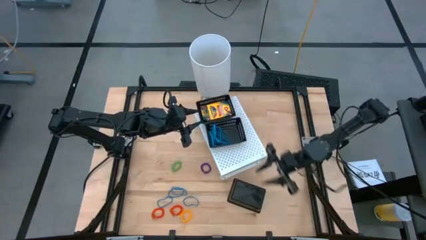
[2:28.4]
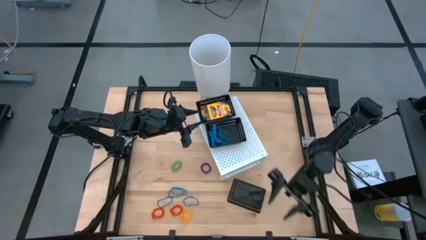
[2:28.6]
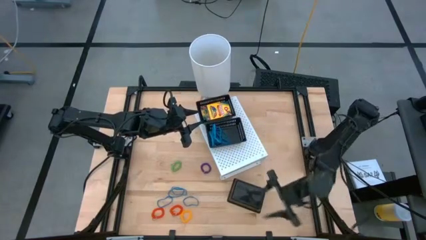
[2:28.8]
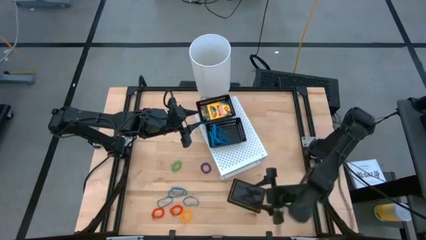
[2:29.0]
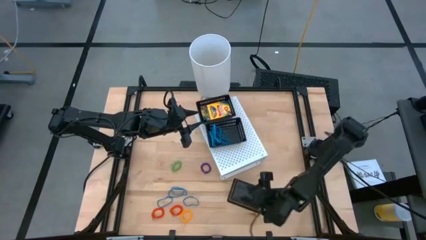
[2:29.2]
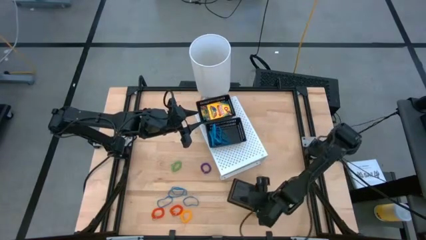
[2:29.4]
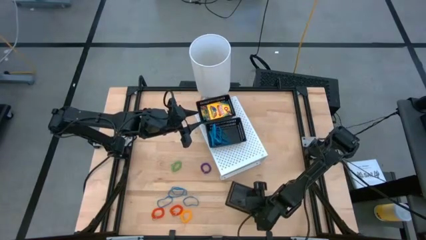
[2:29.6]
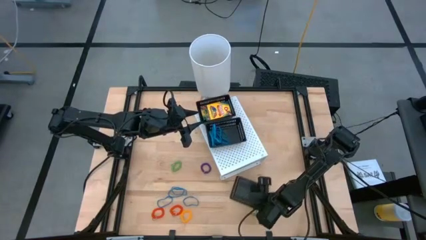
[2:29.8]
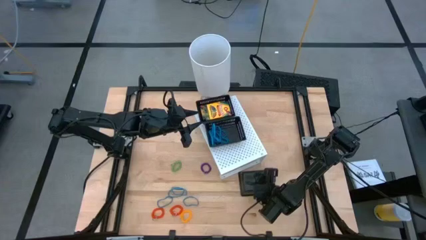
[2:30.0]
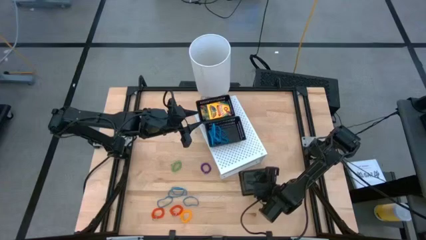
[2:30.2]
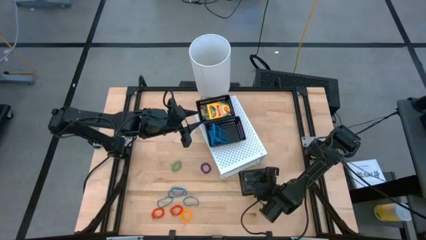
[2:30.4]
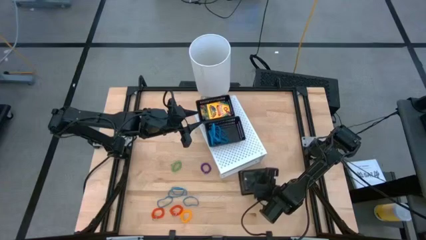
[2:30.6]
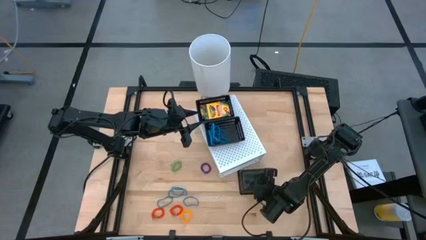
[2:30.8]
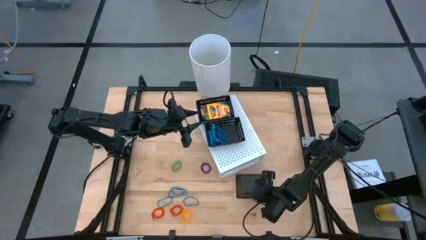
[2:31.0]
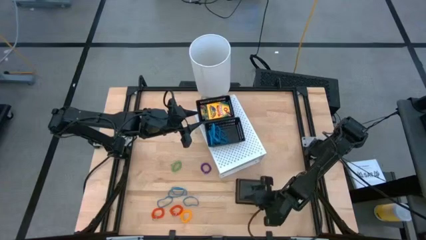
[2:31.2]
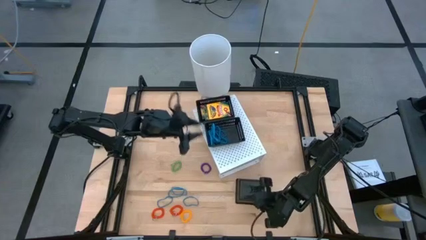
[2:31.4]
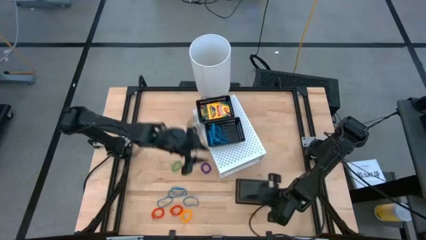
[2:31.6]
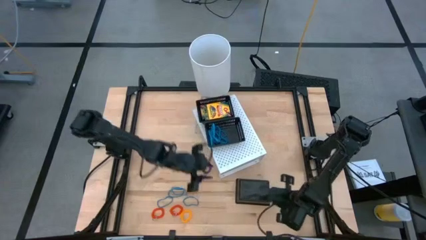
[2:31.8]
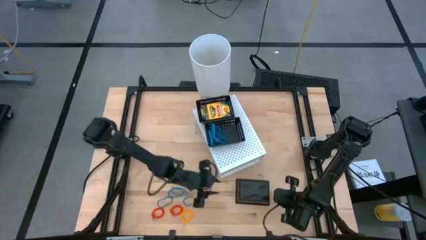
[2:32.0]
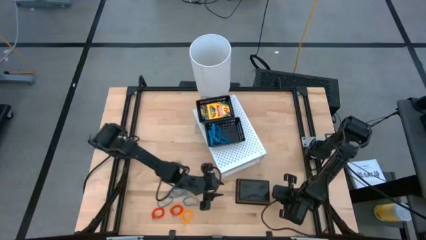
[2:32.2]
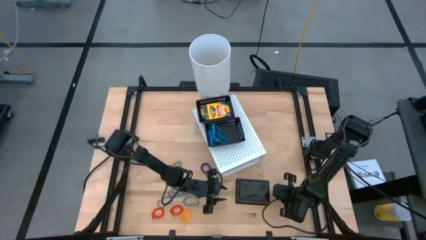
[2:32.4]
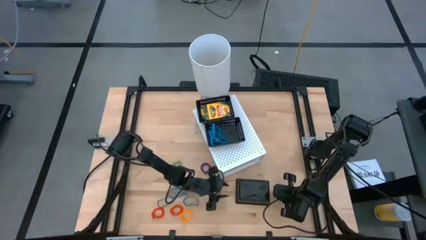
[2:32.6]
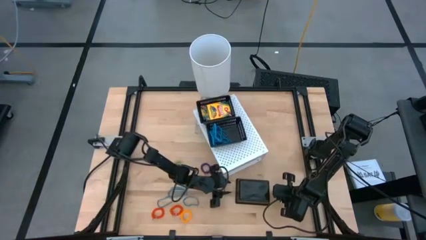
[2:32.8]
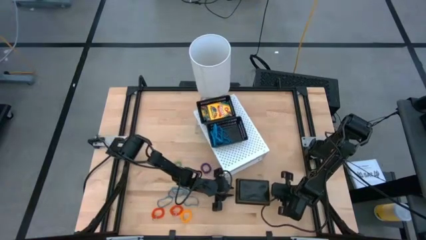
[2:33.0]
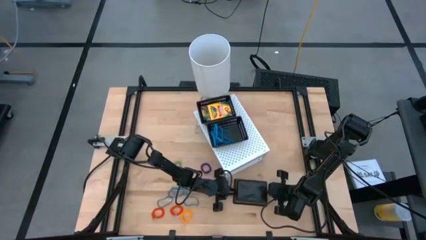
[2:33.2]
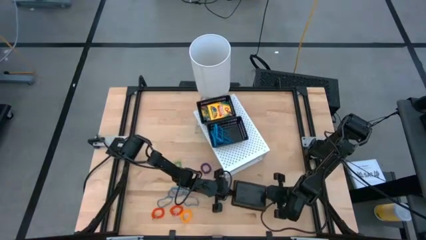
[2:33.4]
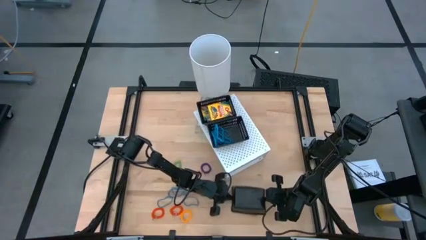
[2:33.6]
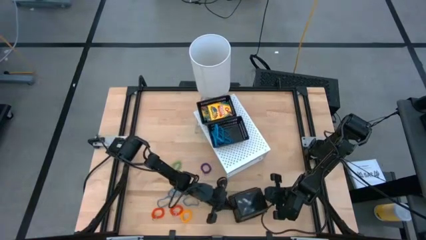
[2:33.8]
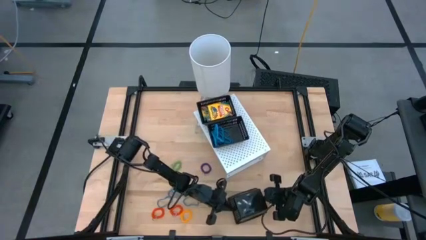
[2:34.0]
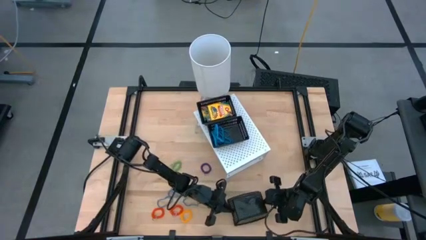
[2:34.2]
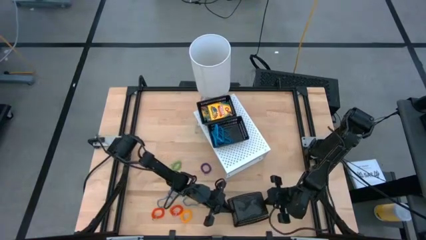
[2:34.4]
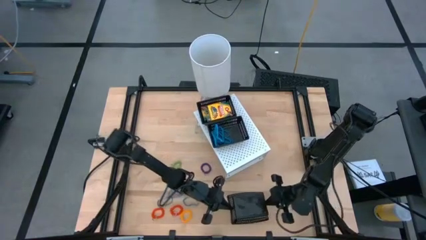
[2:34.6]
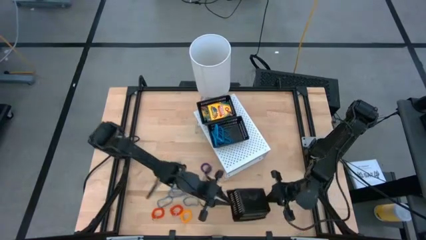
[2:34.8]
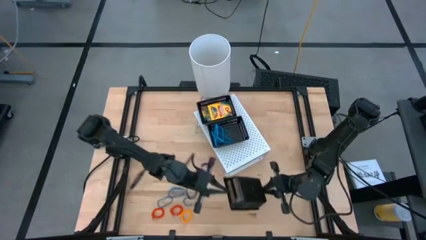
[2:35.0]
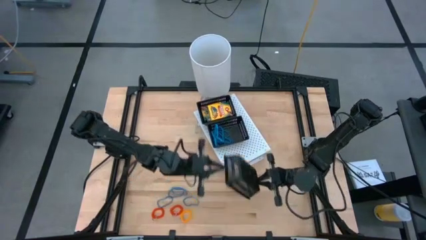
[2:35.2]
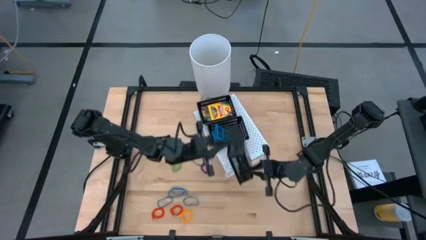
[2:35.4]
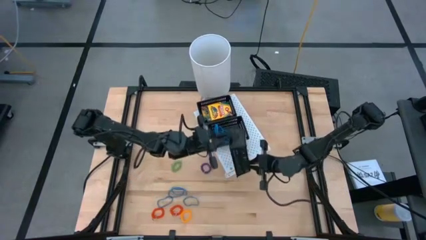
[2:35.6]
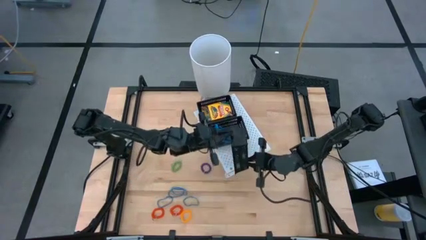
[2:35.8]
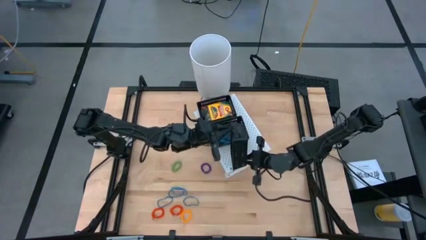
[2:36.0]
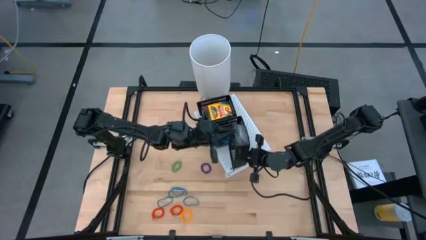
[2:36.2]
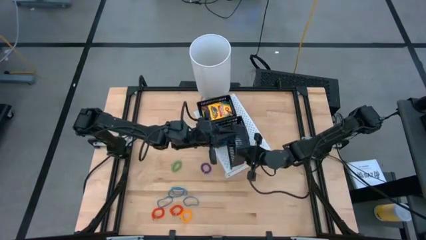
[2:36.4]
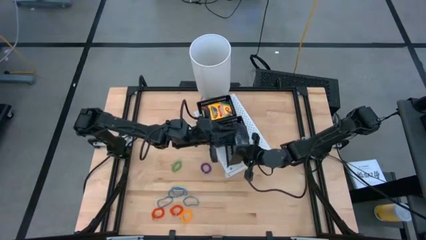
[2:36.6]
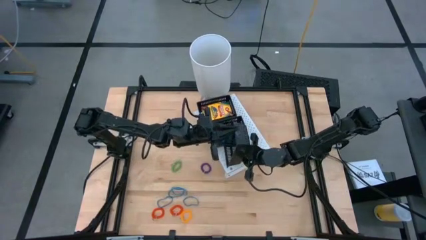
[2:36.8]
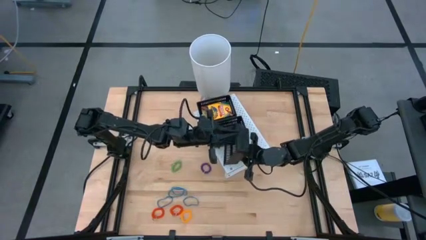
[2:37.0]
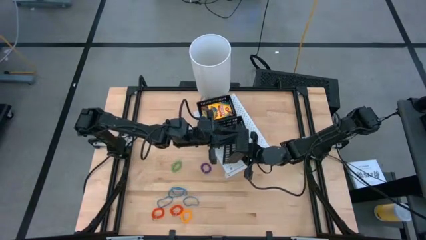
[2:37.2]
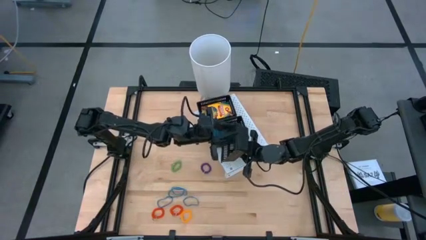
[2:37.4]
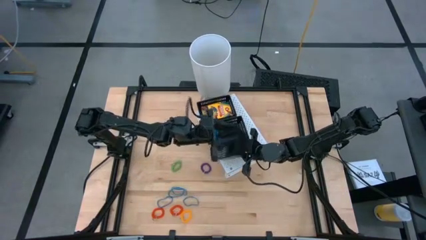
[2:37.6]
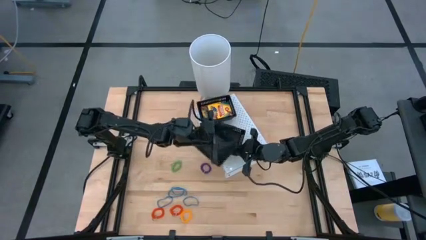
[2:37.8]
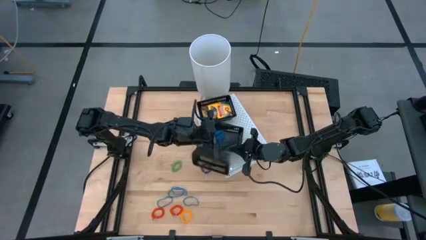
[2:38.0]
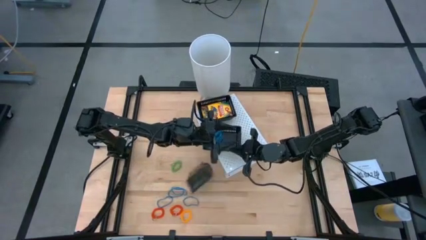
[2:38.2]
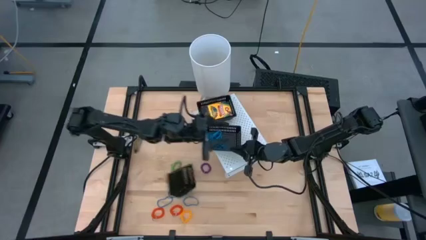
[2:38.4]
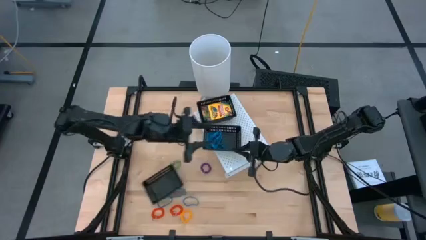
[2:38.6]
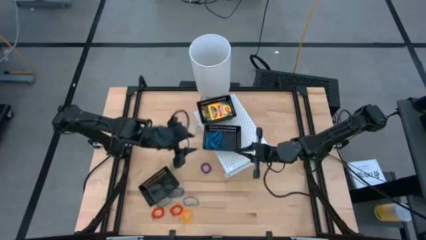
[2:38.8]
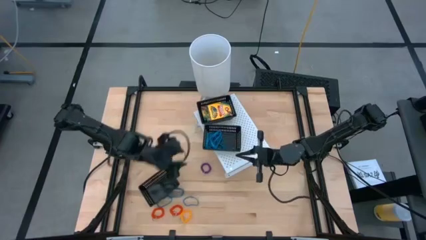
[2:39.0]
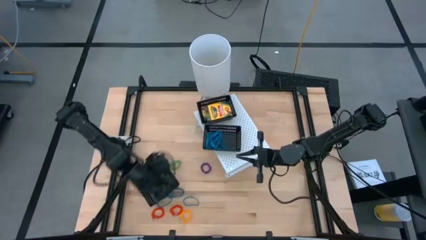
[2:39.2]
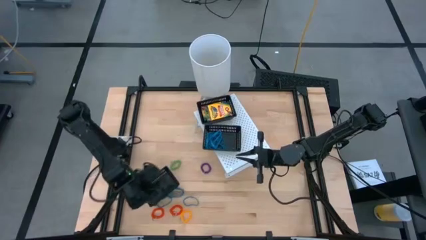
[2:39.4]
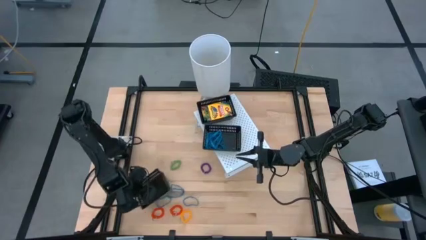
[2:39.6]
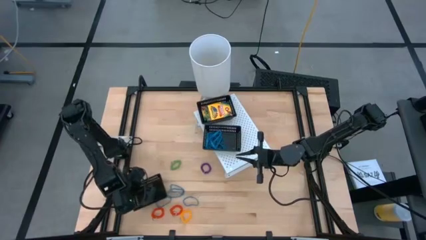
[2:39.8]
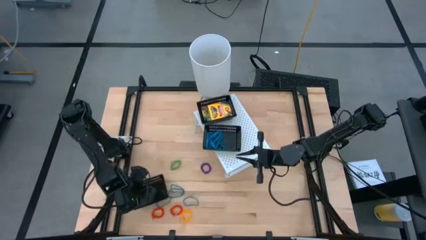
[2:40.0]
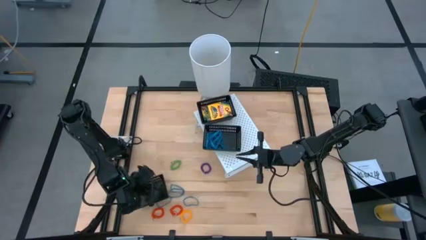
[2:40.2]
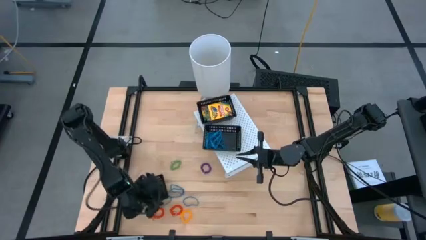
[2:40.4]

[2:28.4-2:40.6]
Task: Pick & Place Office Desk Supplies
Put the black bin on the shelf

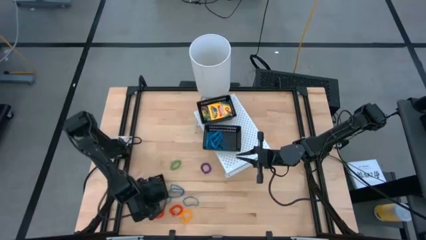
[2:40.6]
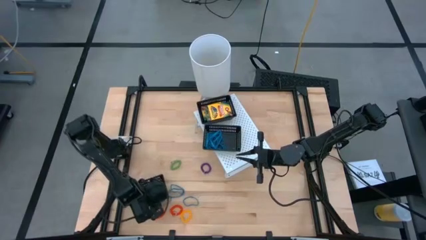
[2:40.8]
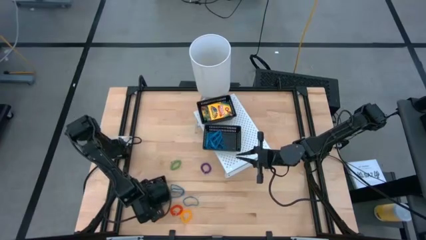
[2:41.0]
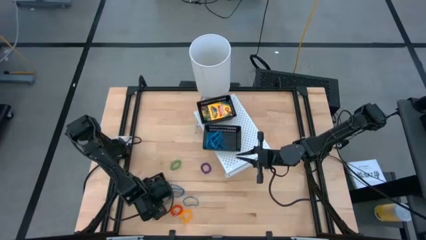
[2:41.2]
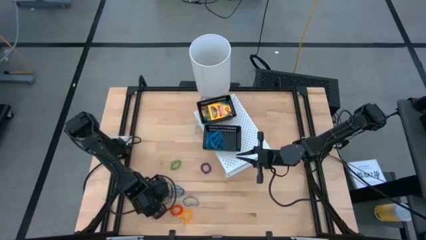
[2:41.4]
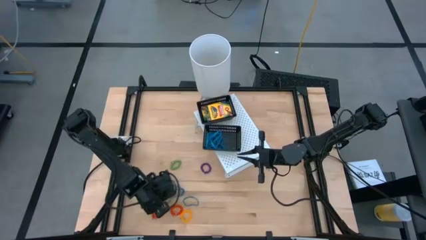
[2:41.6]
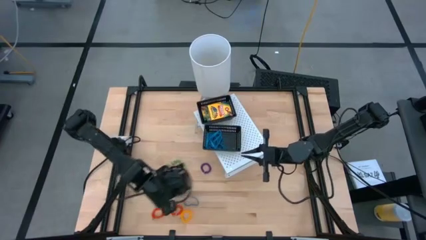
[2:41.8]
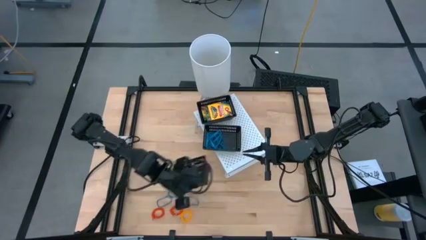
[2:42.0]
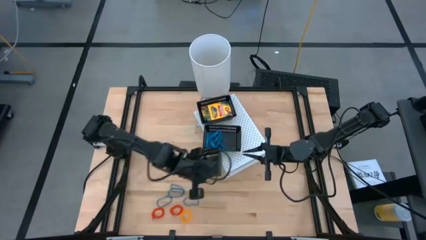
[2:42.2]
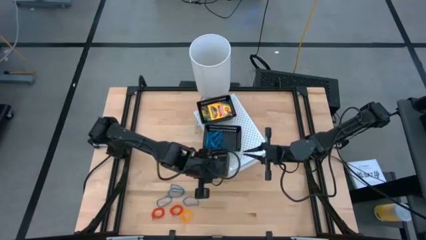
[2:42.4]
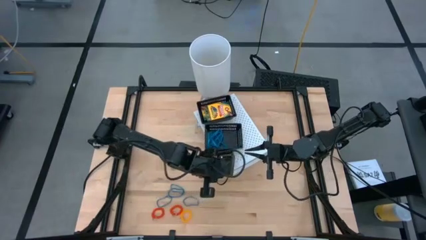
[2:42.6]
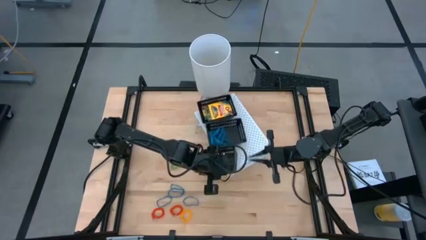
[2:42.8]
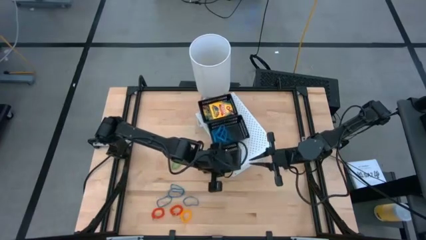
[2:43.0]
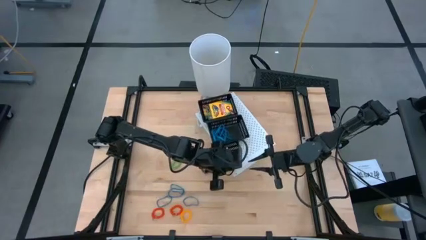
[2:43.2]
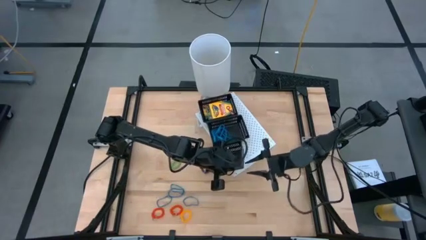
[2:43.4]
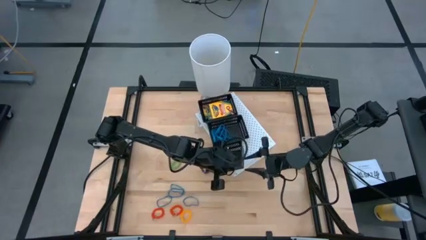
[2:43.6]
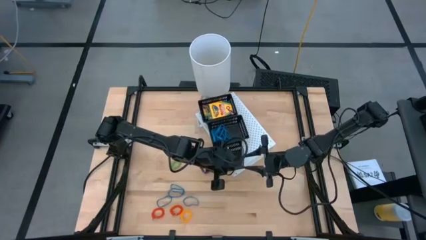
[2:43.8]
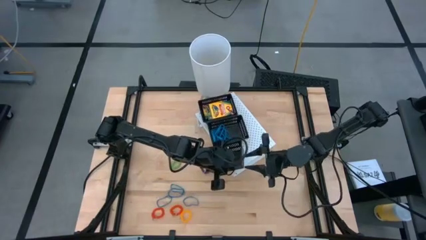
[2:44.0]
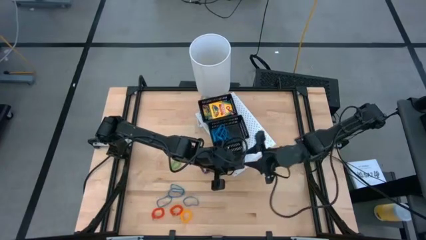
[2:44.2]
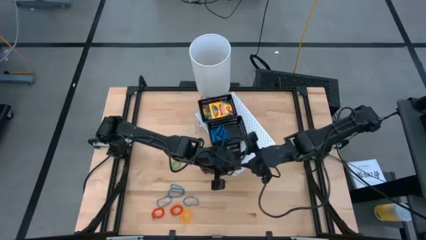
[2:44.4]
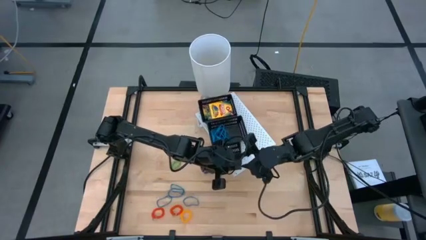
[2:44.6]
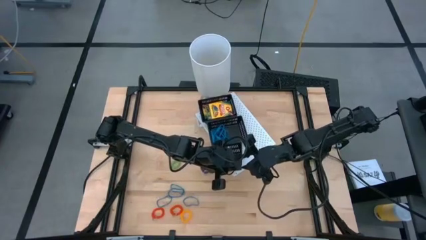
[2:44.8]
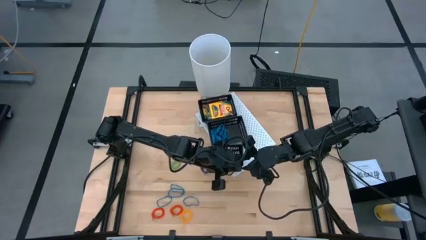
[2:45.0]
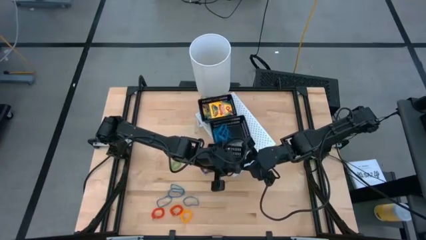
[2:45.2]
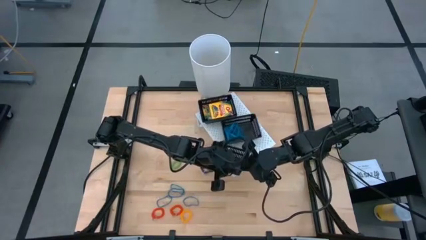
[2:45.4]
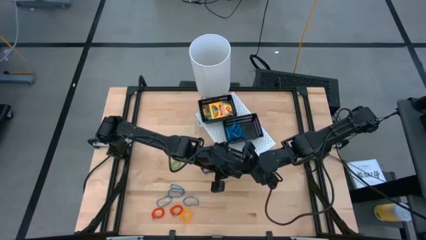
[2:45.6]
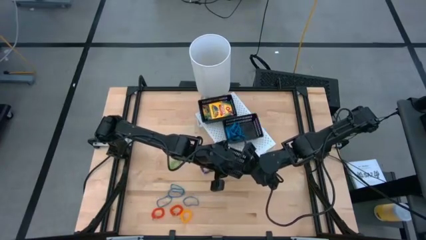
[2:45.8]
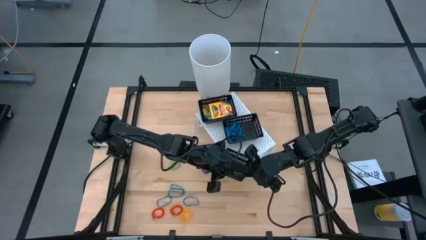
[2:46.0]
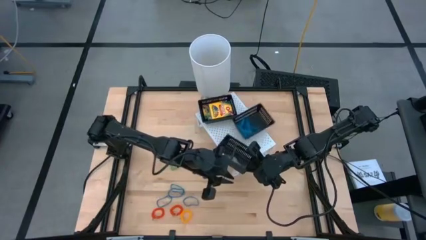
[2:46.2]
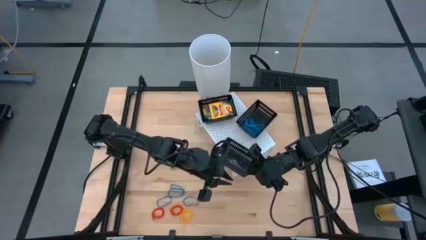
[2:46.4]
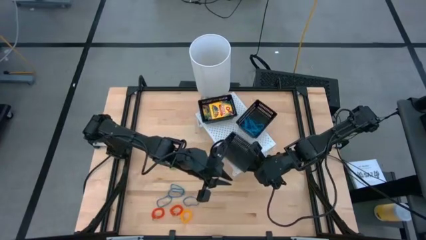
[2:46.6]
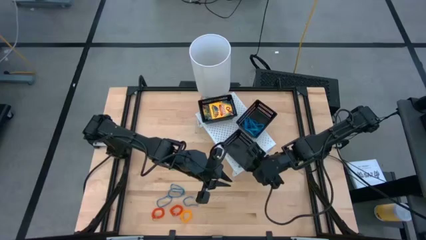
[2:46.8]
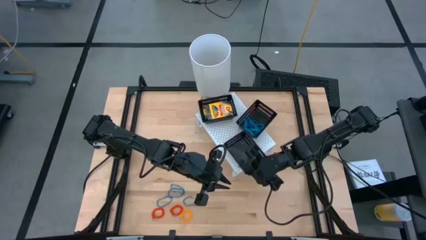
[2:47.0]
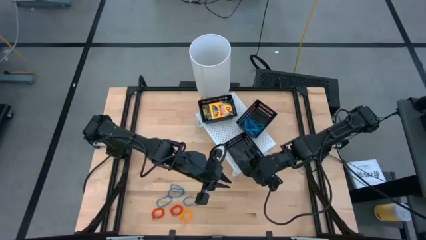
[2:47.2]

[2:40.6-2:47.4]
Put the black bin on the shelf
